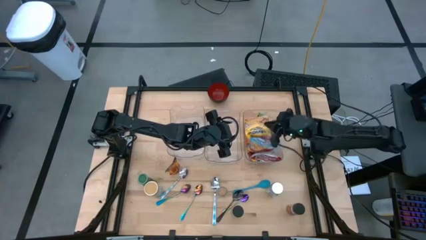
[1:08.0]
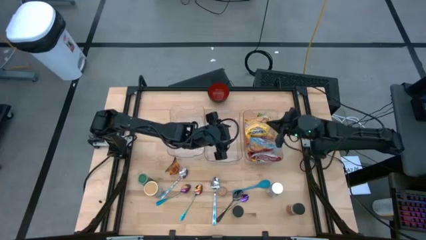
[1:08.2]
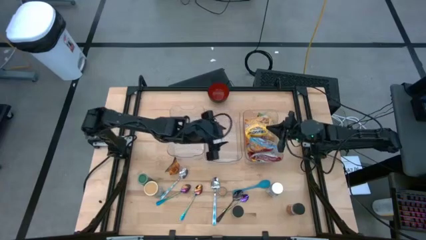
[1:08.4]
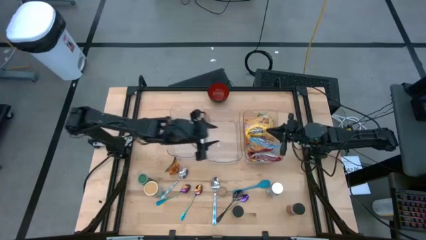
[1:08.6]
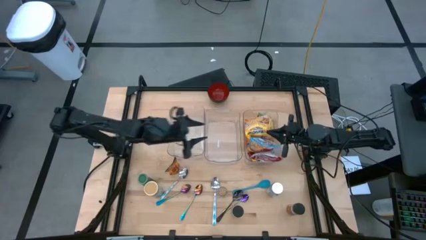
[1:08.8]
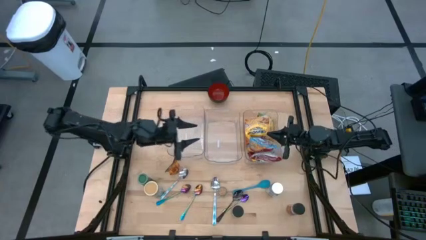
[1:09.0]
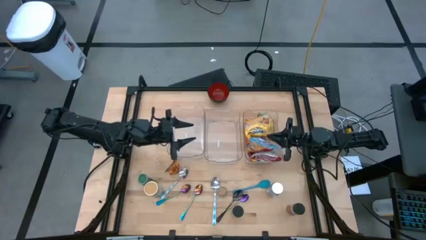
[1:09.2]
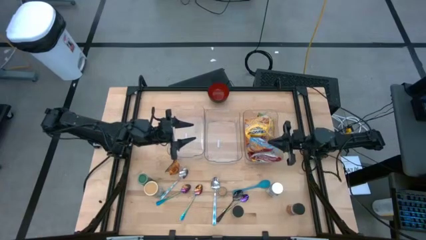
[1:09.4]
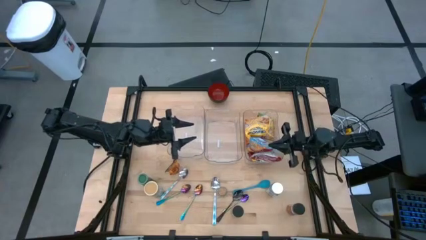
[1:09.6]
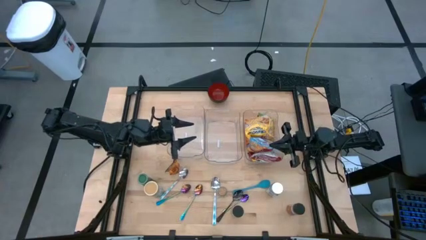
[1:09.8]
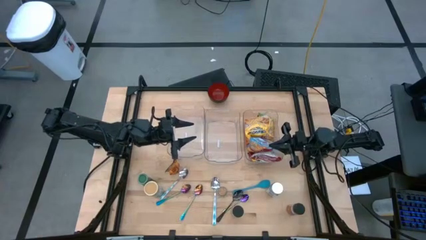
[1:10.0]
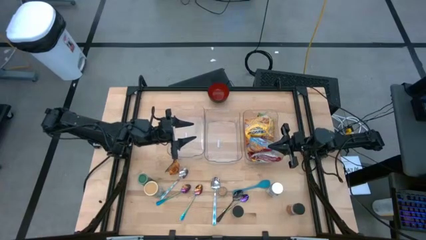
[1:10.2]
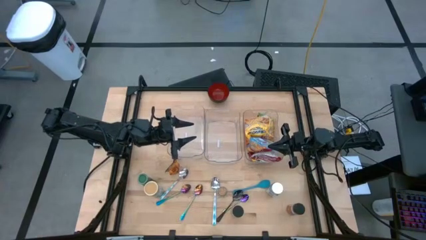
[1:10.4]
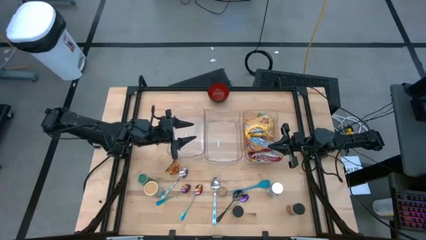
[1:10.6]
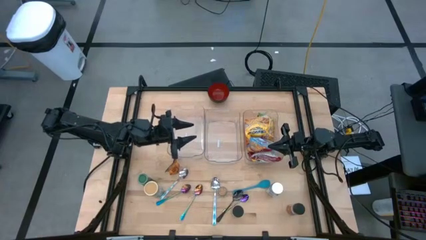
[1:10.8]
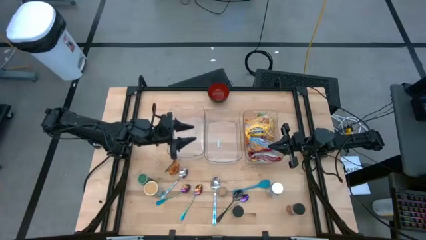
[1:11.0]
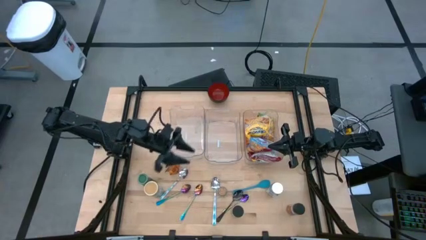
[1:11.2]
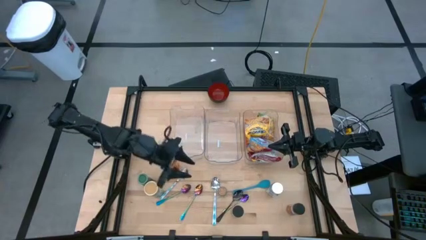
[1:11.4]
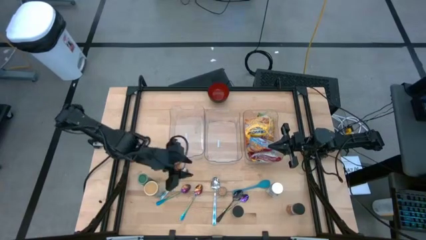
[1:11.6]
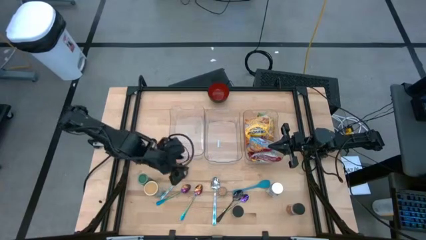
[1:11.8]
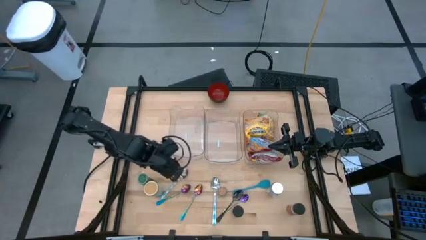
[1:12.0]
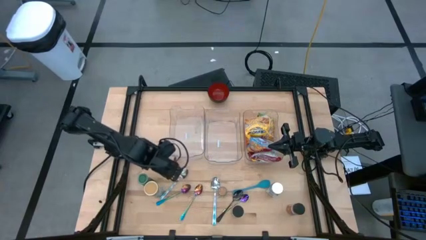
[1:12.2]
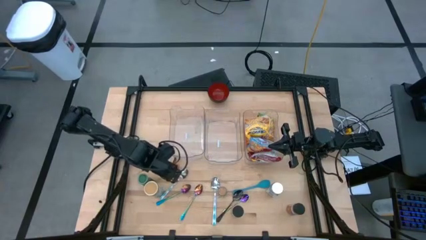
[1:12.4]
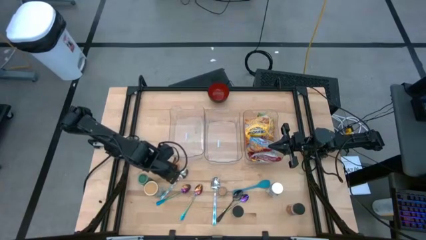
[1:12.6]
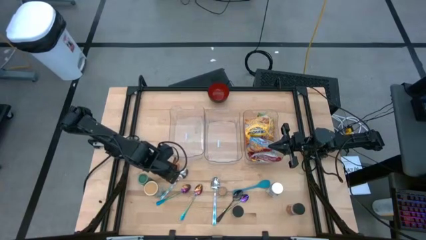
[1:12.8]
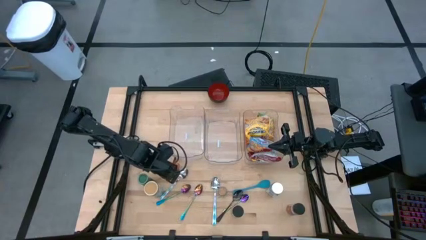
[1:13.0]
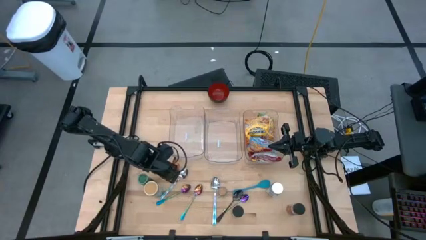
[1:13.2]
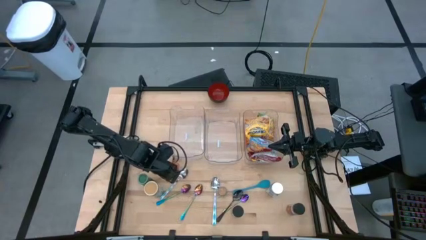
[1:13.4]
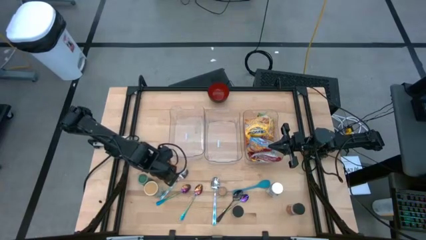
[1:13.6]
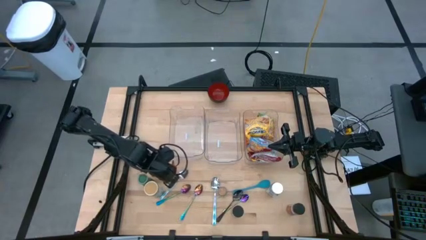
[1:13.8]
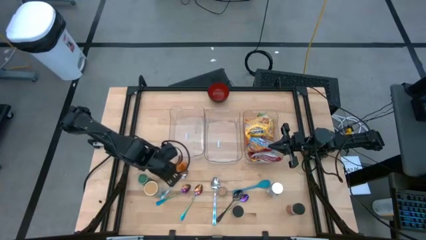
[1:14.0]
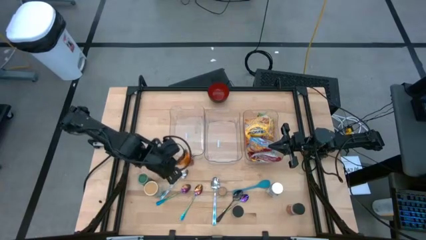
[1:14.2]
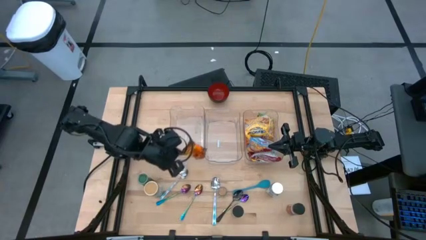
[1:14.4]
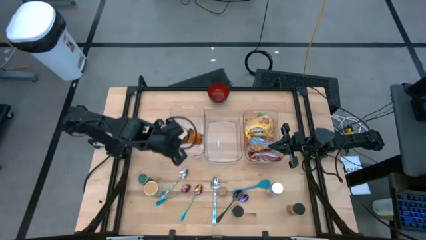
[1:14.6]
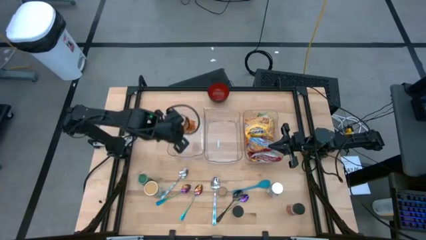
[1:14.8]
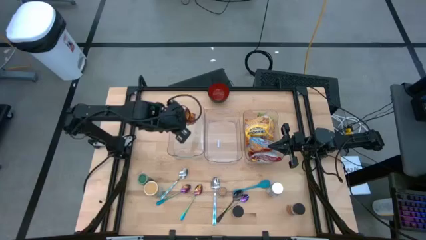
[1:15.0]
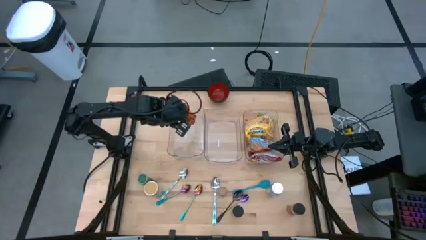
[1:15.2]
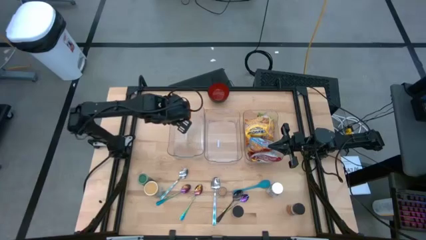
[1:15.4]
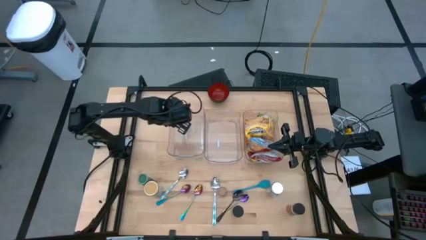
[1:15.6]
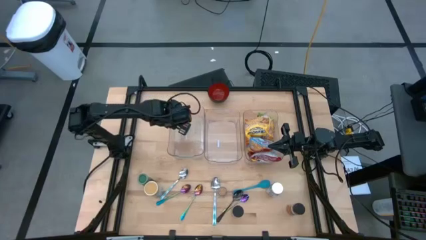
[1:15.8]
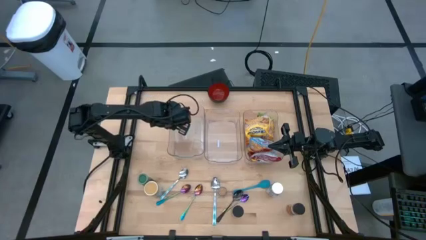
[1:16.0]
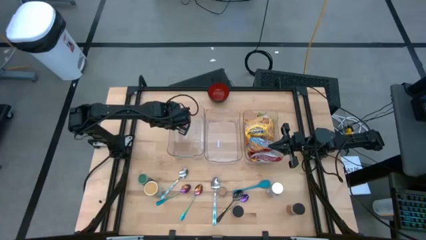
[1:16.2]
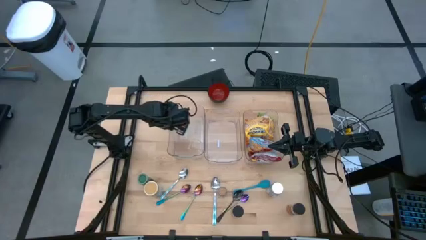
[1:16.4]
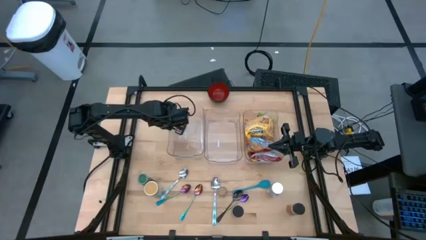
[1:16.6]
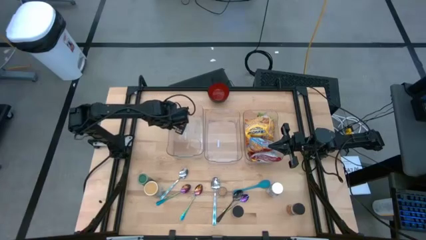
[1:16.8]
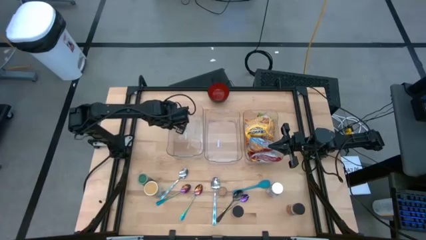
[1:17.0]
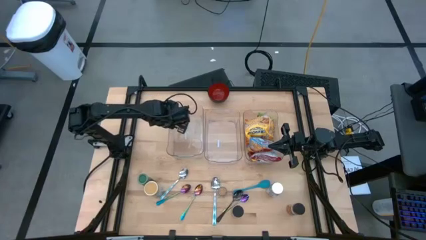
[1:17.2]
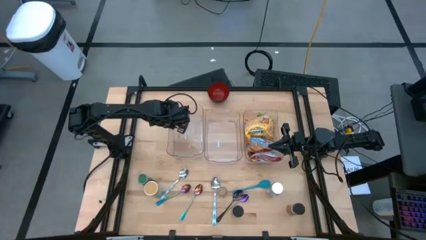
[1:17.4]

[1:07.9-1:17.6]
Task: Pick & Place Food Item
Put the orange seasoning pack into the left transparent bin

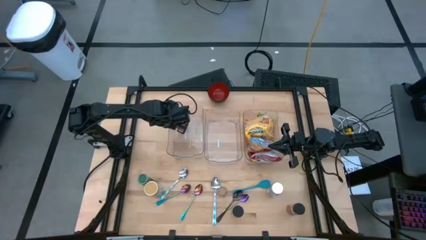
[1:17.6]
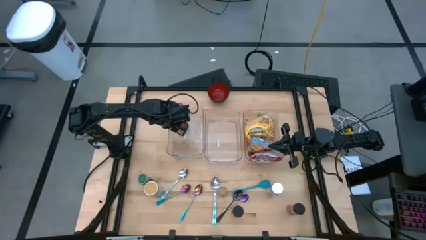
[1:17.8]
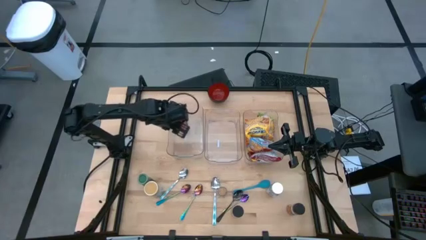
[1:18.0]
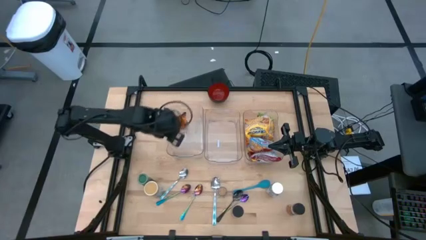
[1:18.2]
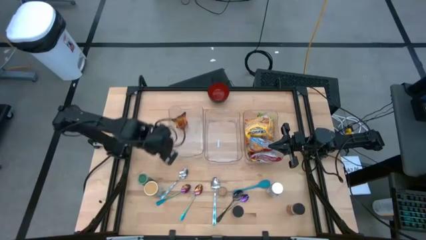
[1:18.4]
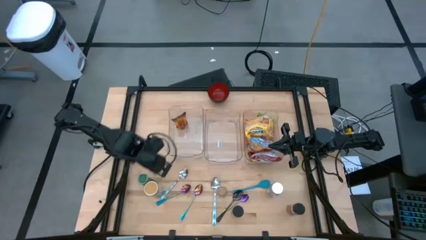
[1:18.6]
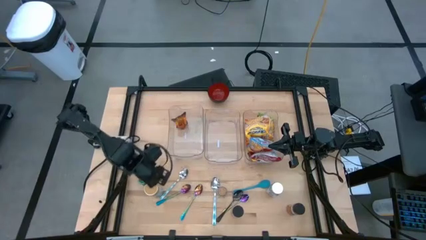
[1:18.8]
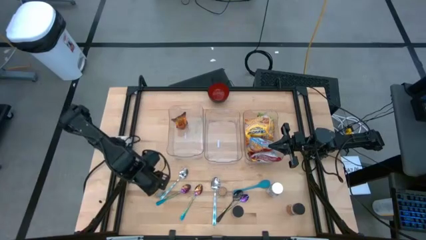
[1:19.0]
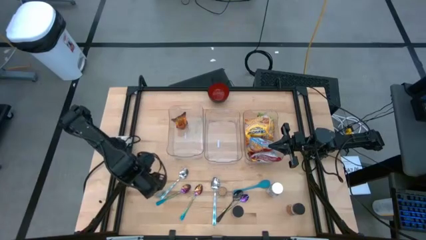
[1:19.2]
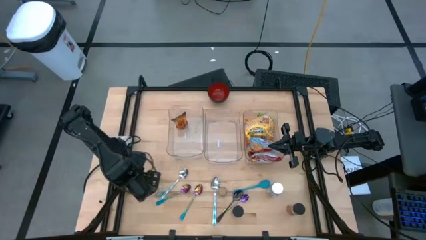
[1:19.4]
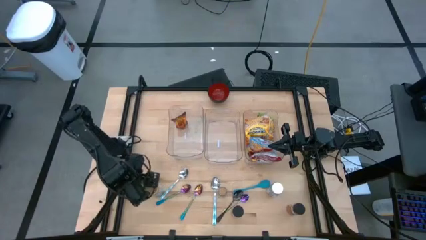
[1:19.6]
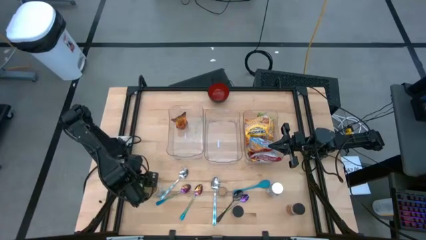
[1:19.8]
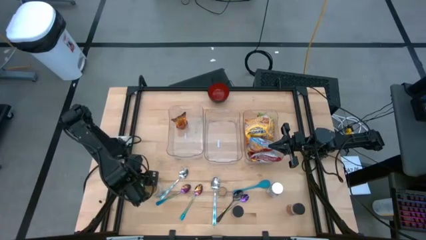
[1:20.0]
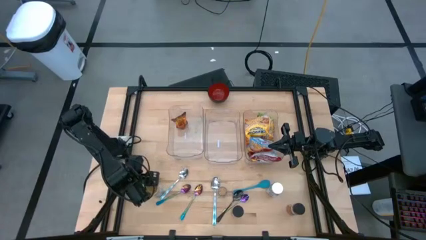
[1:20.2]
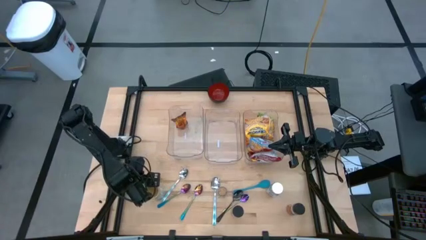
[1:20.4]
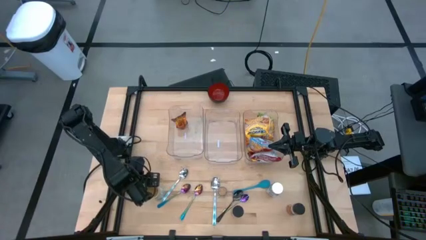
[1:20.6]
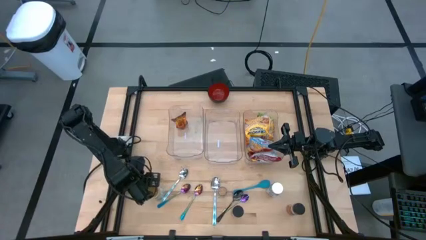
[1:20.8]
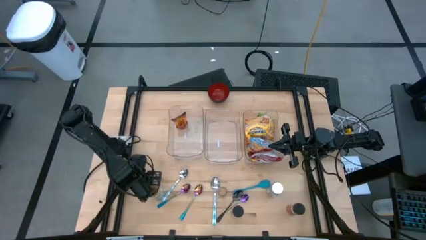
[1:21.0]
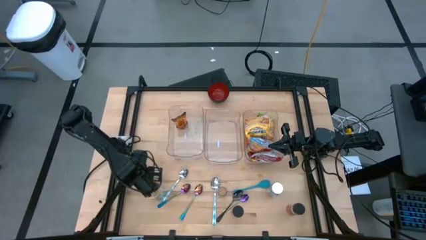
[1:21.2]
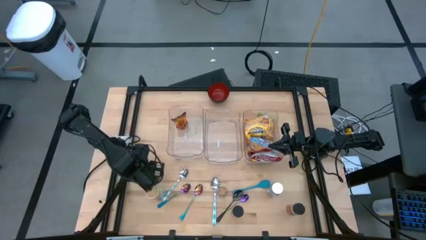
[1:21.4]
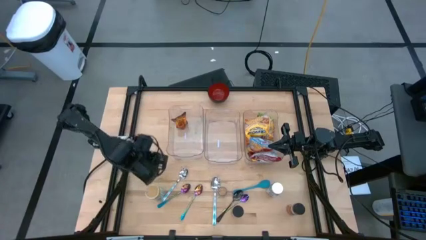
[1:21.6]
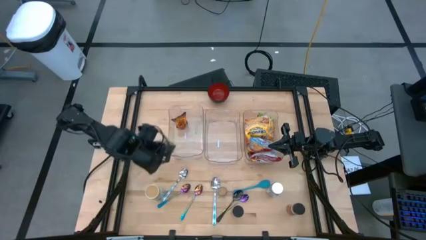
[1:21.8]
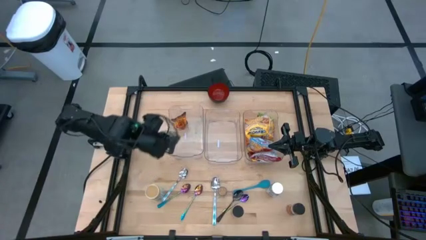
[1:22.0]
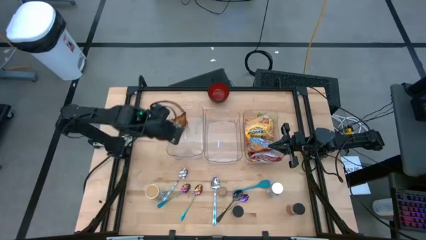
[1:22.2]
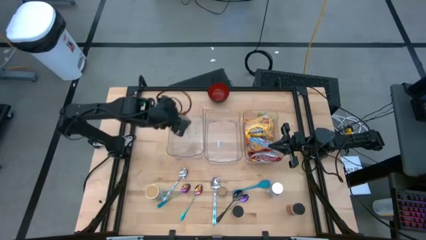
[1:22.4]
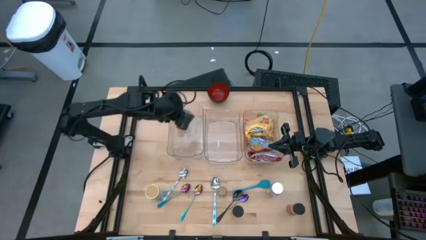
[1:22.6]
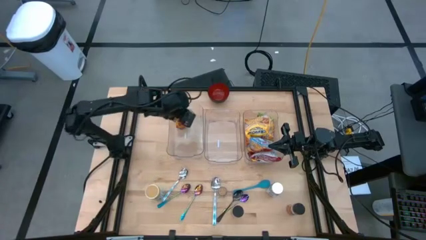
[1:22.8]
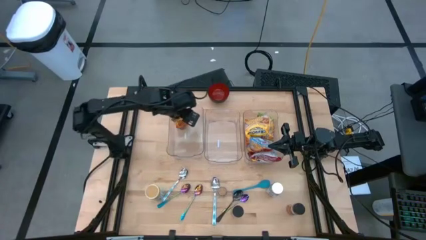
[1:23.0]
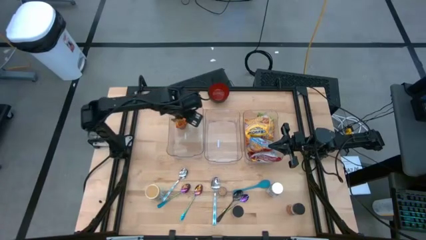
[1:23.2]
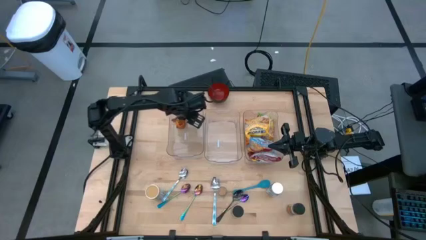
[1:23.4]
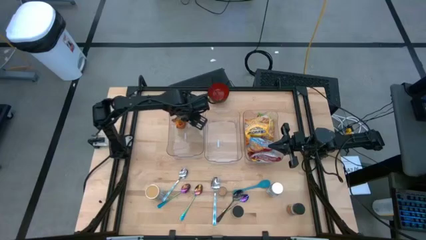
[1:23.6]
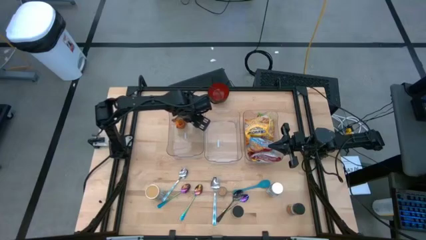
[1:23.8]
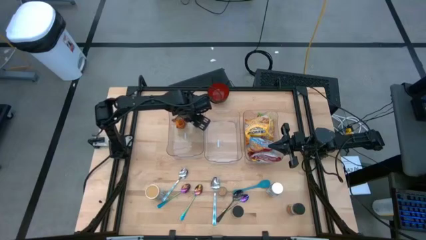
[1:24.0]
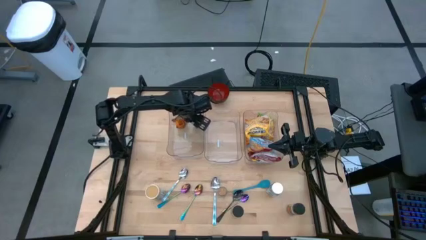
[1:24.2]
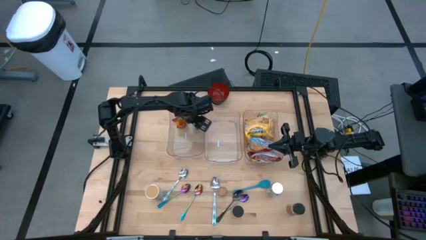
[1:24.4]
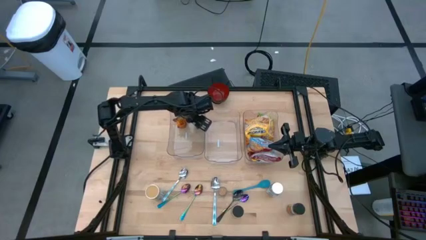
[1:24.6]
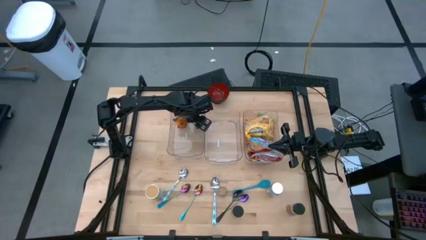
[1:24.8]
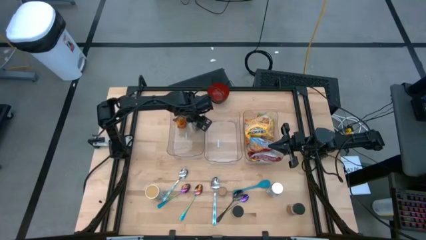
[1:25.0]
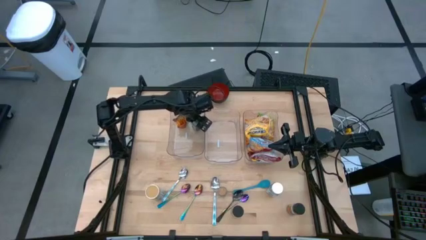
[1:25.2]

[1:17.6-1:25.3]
Put the green seasoning bottle into the left transparent bin
